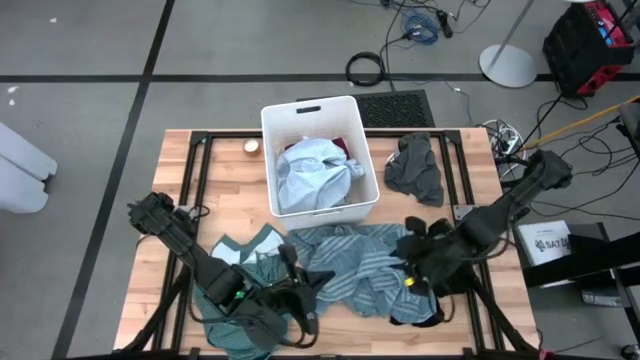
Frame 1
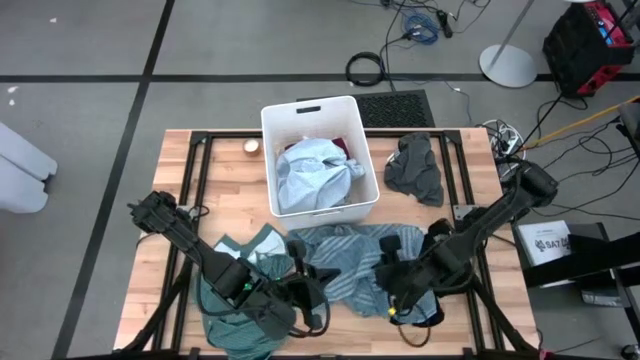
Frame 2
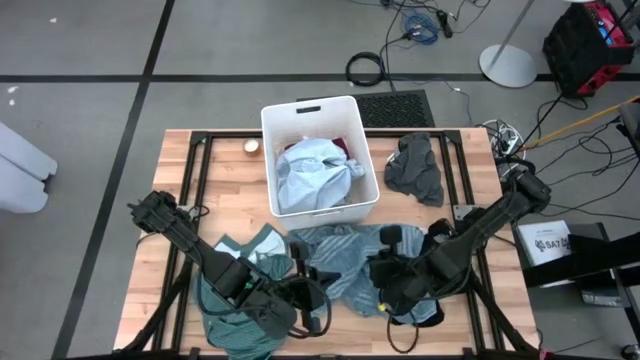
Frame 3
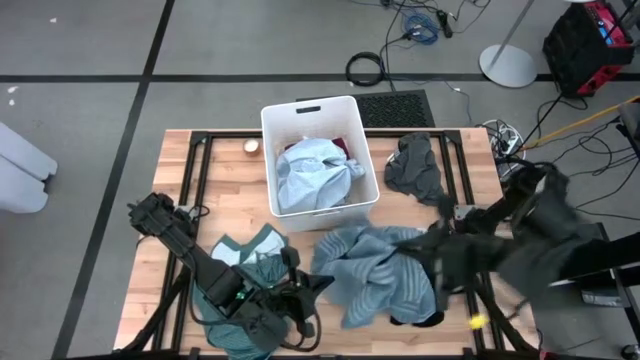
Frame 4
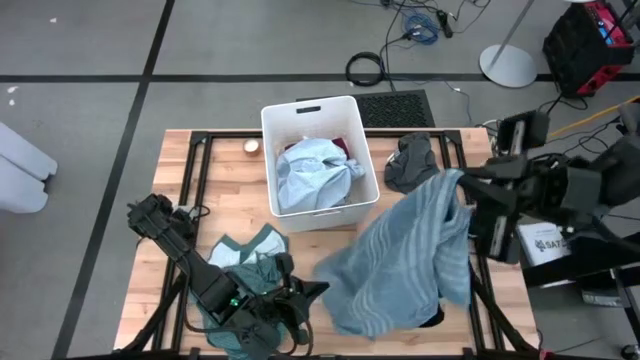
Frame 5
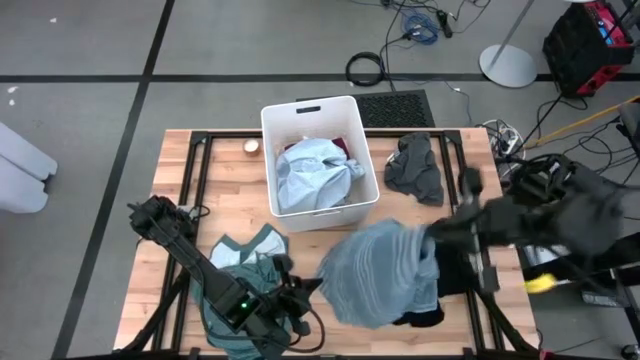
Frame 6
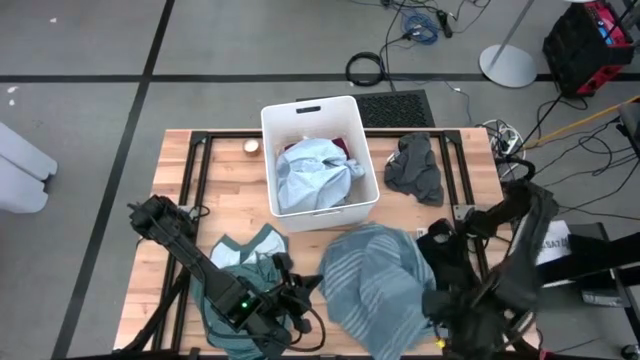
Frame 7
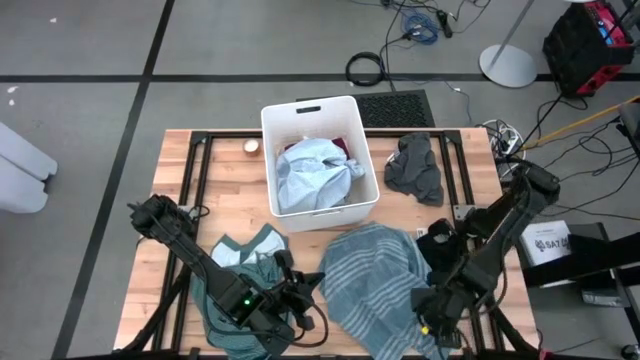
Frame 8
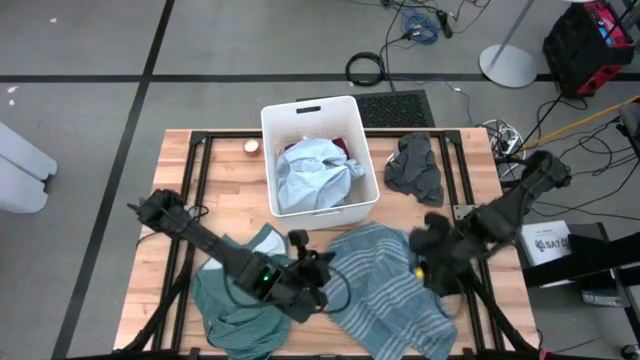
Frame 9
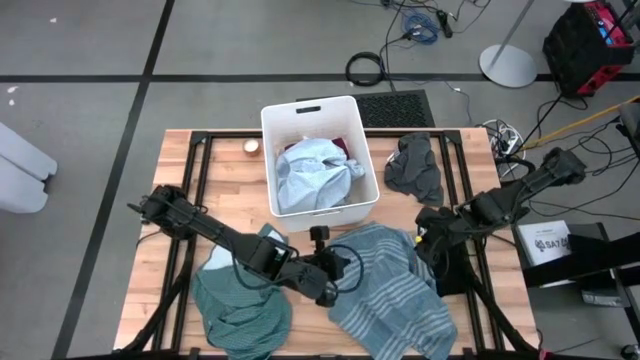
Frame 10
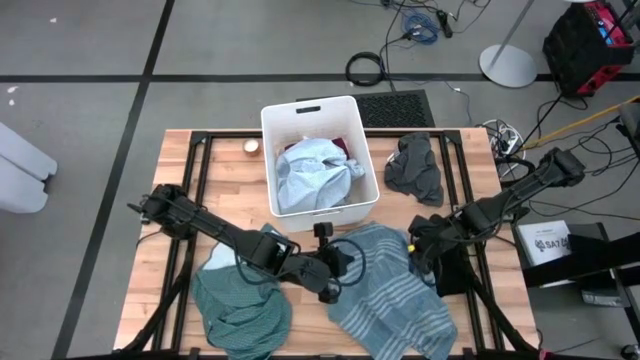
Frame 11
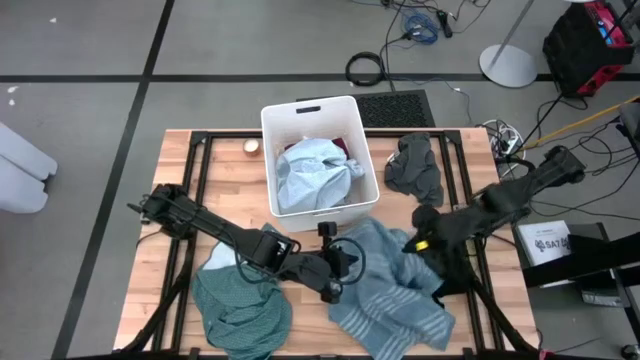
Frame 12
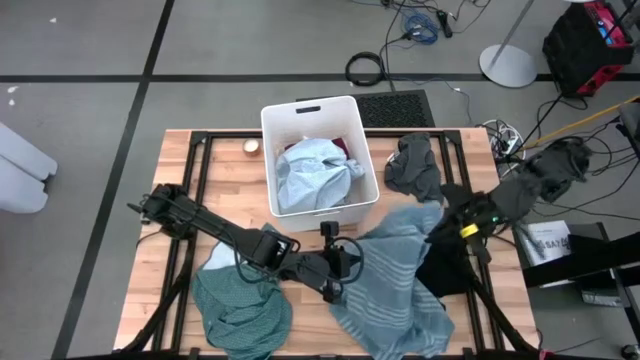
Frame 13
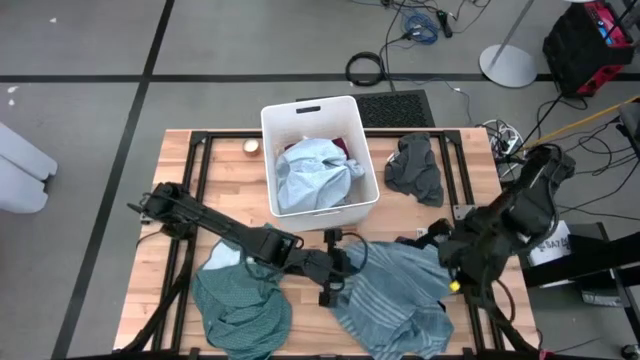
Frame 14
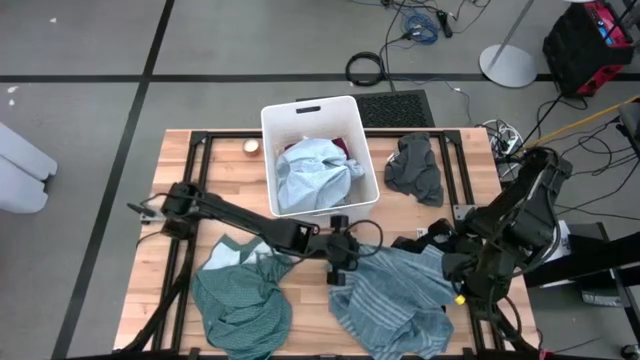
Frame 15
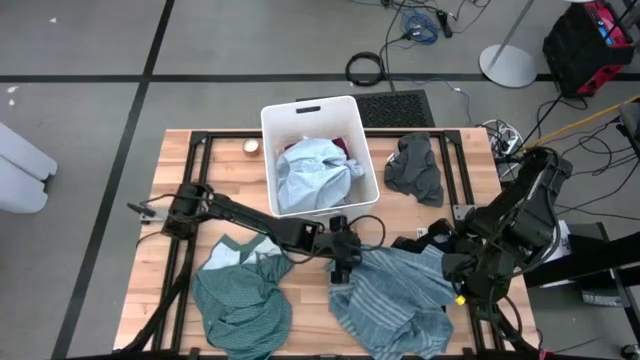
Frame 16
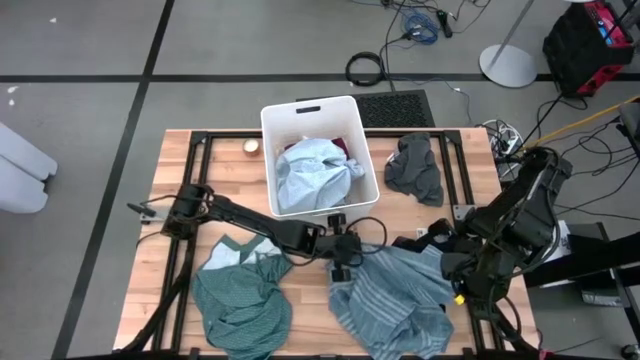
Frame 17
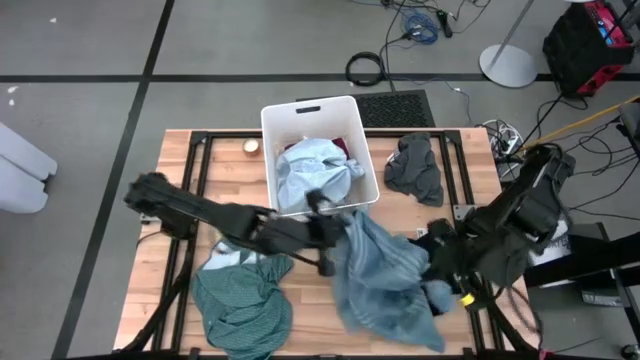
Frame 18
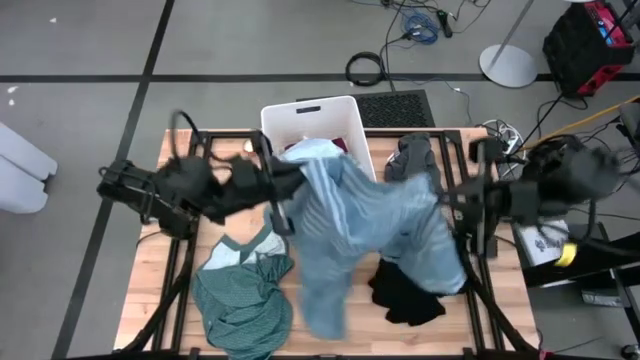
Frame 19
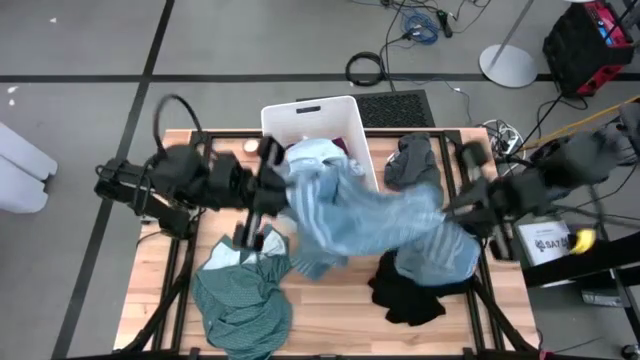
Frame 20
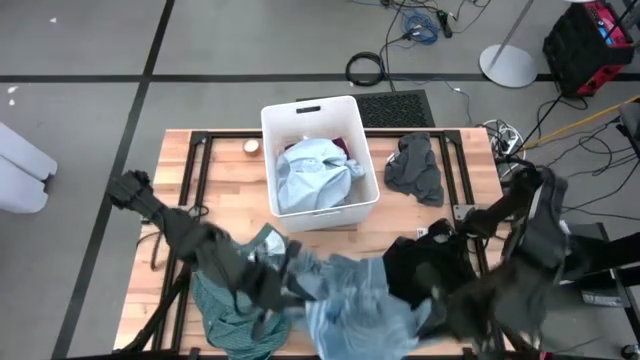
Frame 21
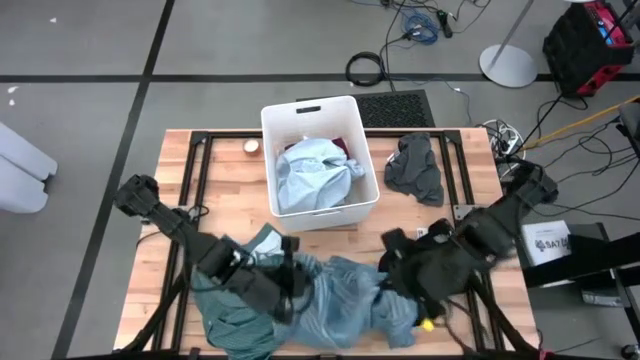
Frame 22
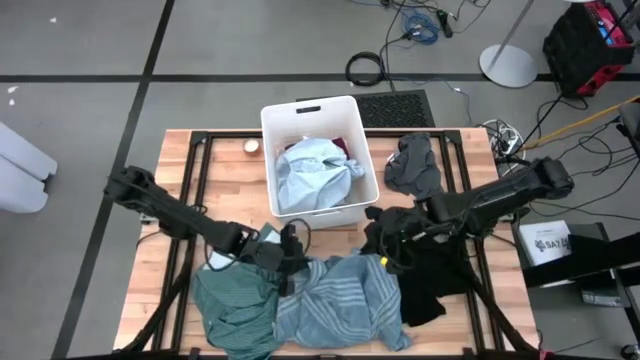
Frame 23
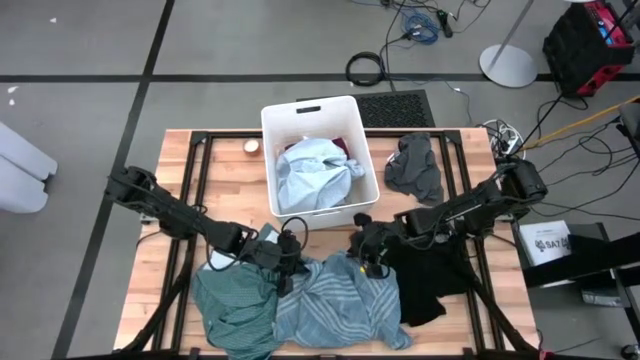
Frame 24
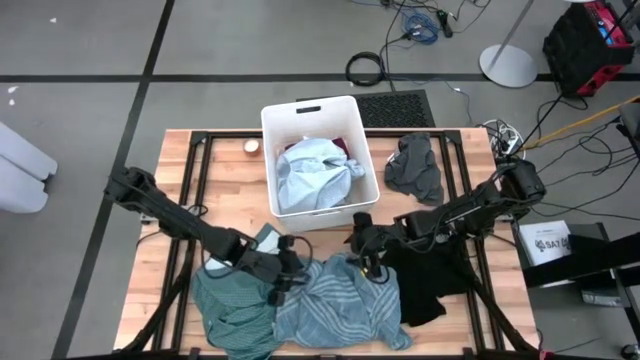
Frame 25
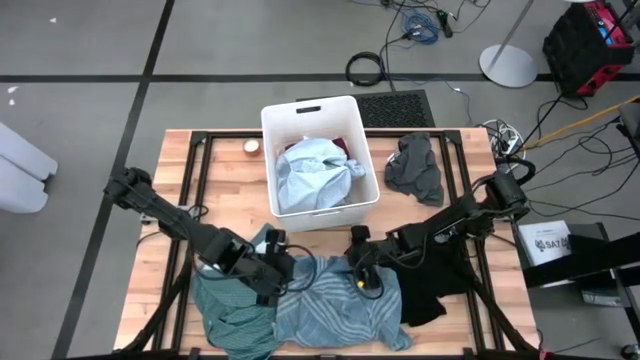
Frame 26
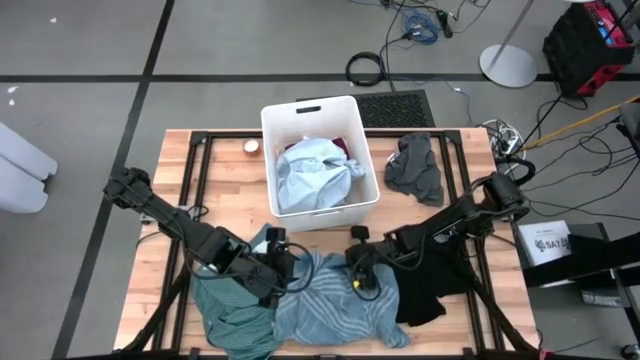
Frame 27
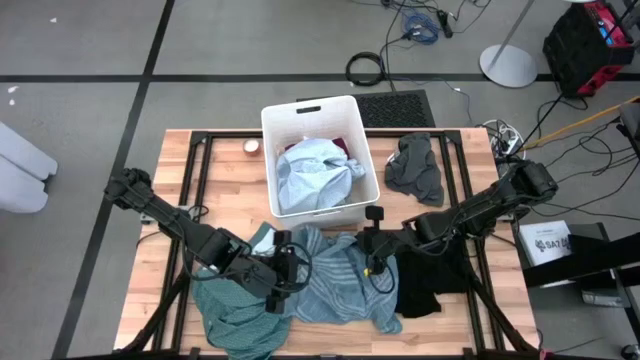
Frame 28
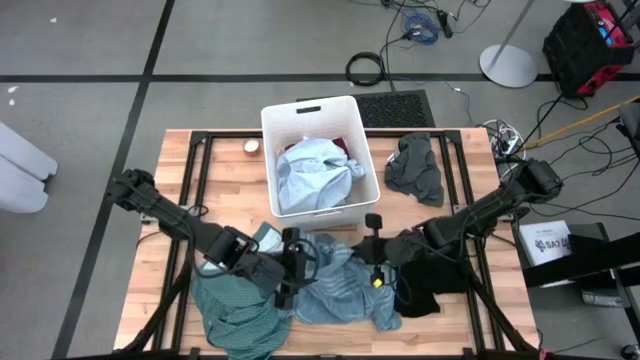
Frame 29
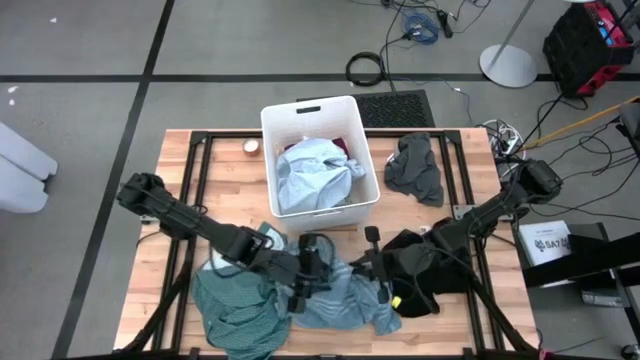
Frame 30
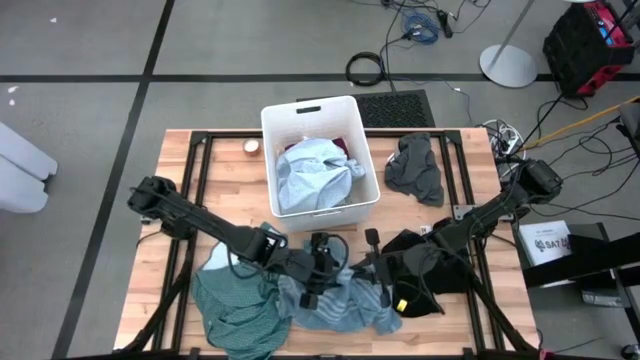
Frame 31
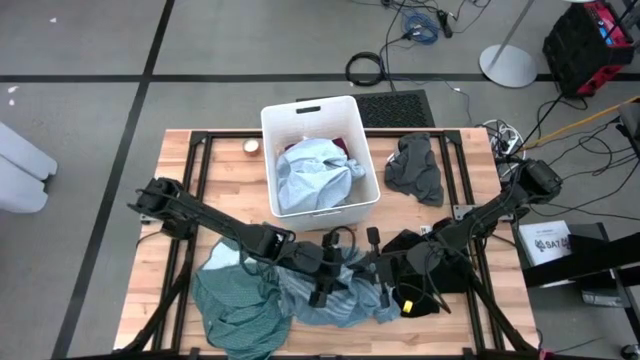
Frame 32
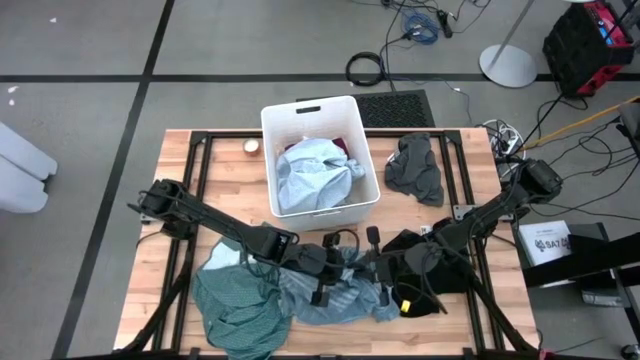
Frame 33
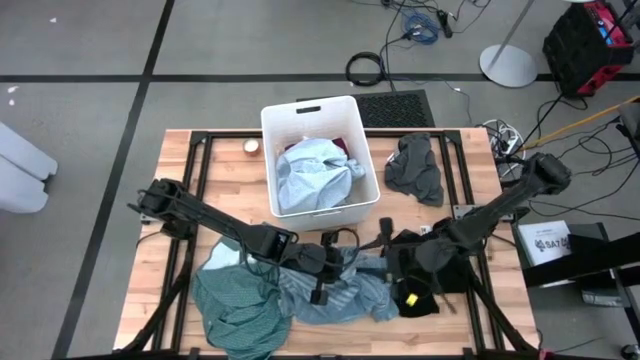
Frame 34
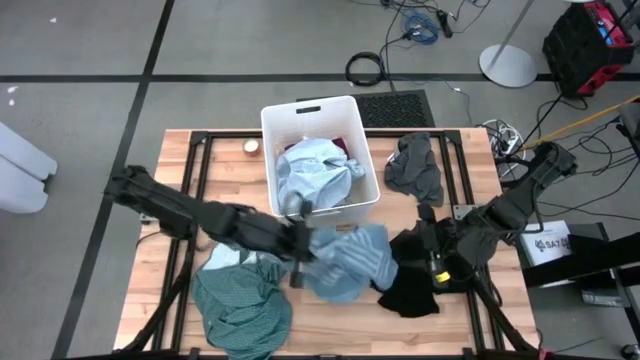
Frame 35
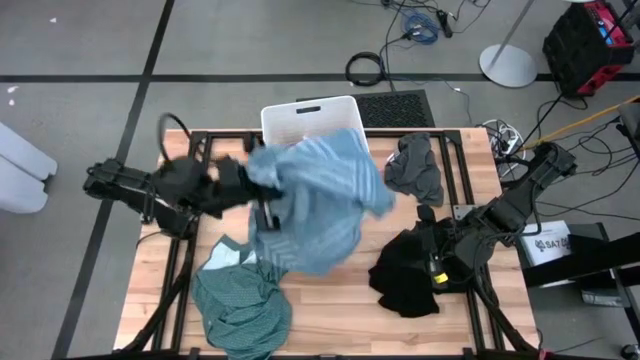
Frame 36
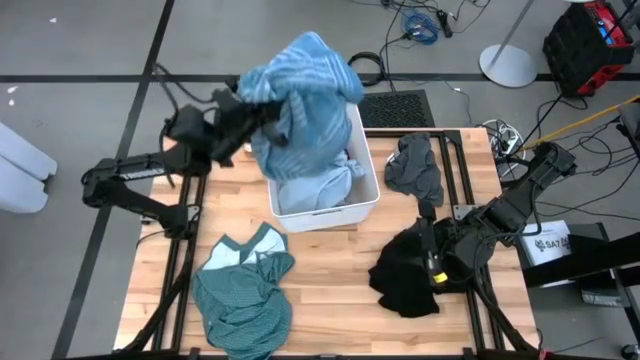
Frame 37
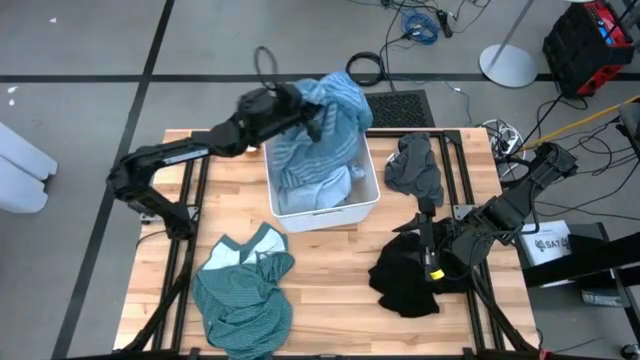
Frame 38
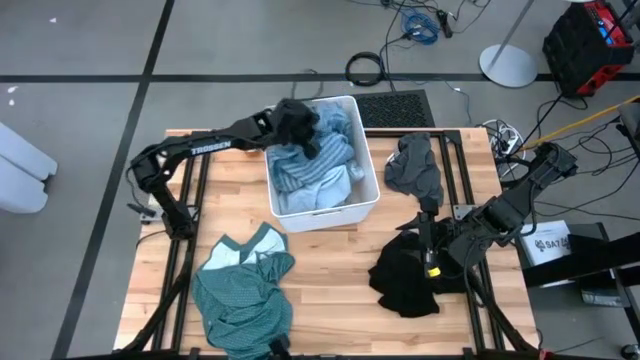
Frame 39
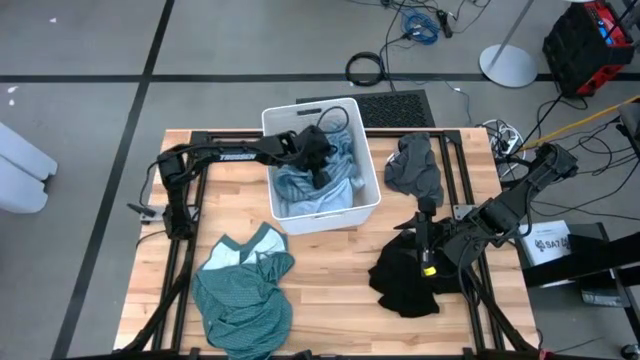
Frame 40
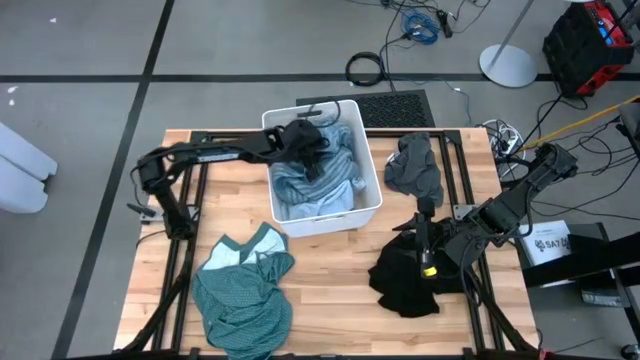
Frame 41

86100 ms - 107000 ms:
Task: Sort clothes
Put the blue shirt into the white laundry bin
